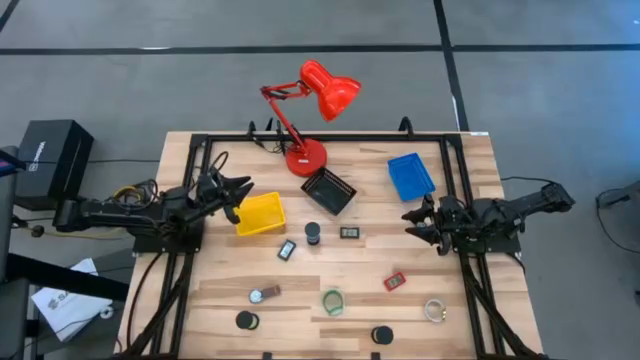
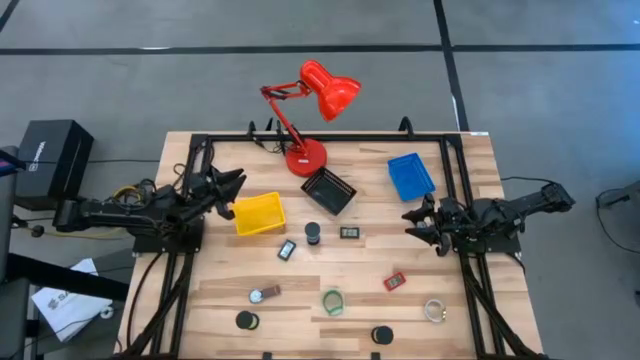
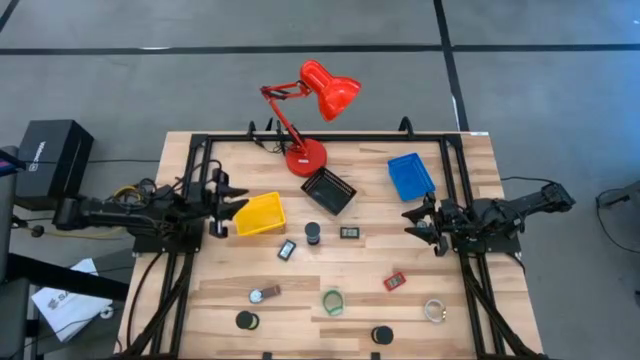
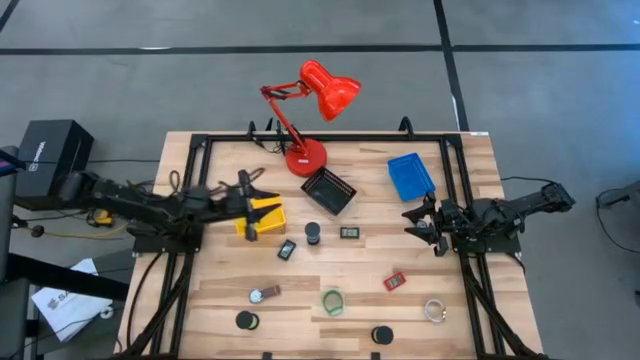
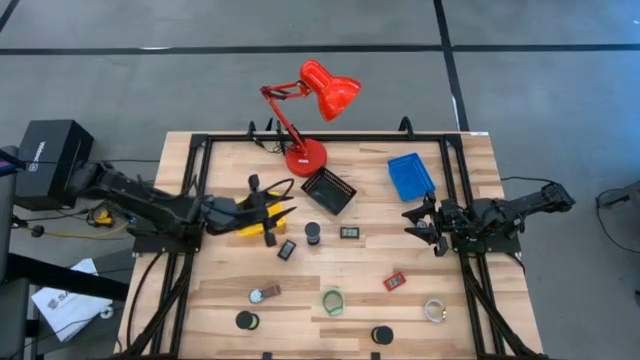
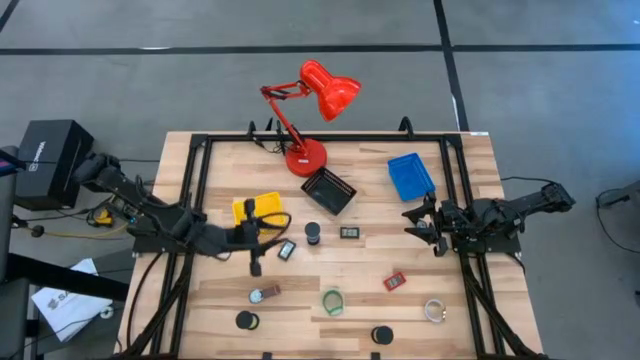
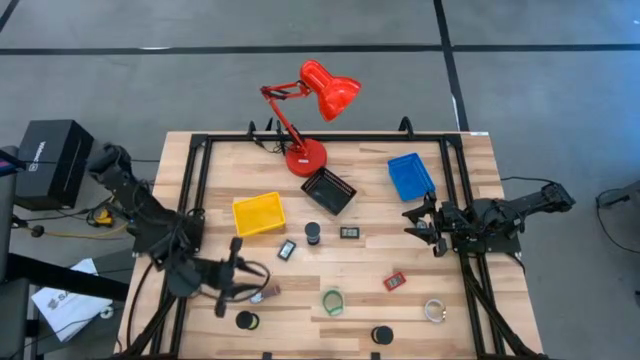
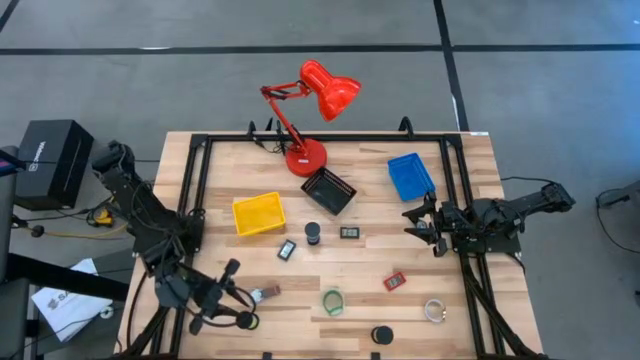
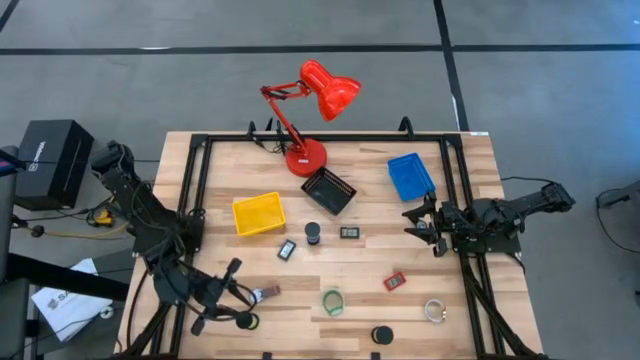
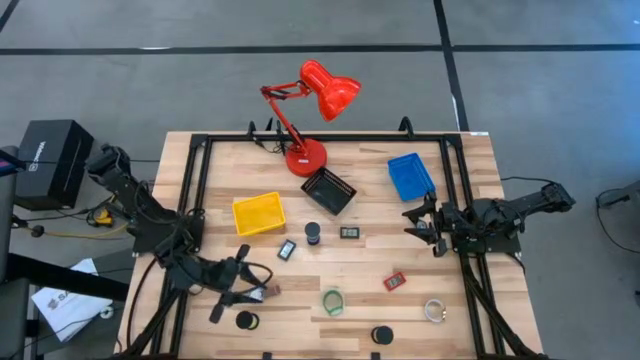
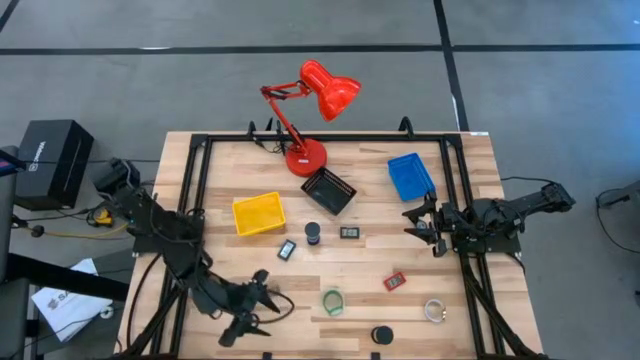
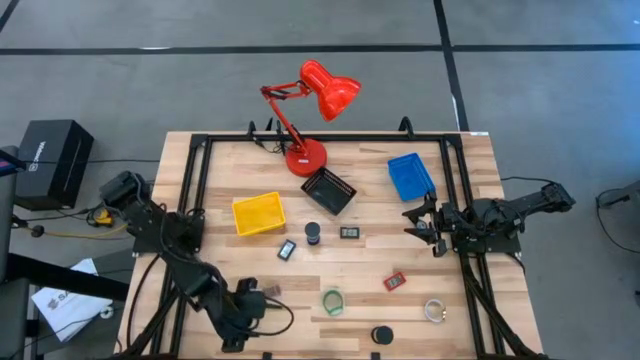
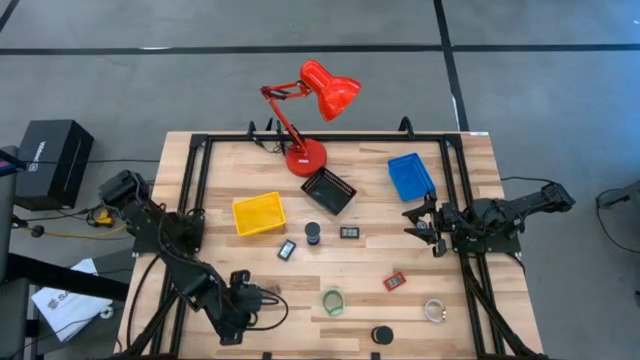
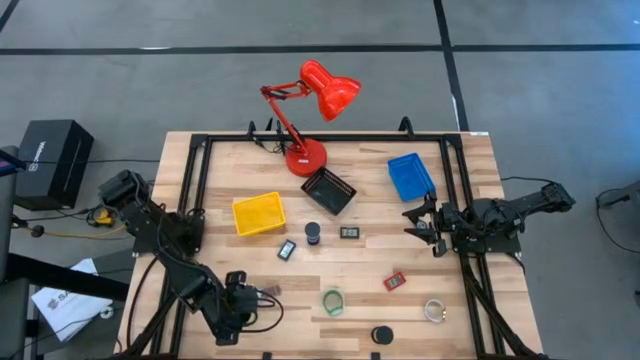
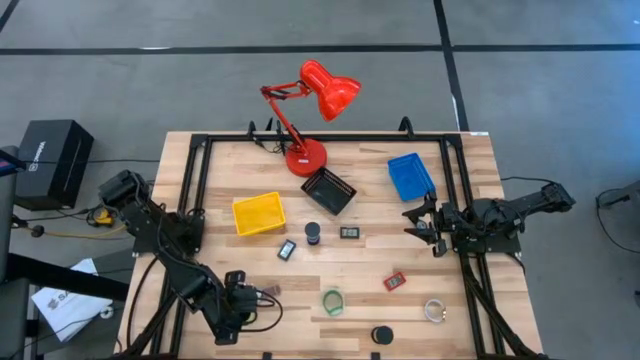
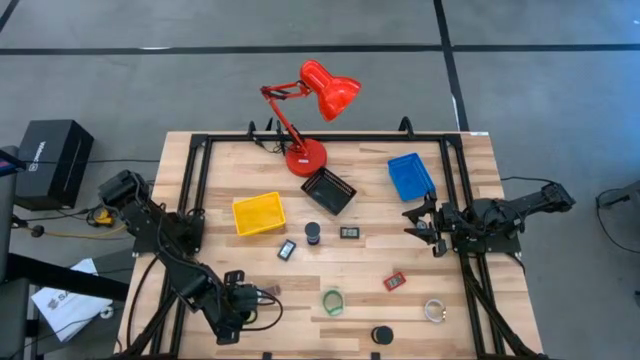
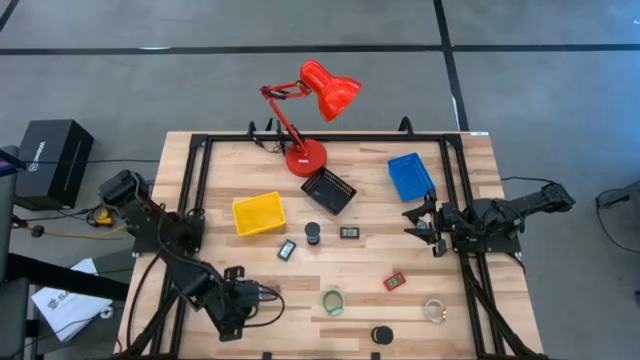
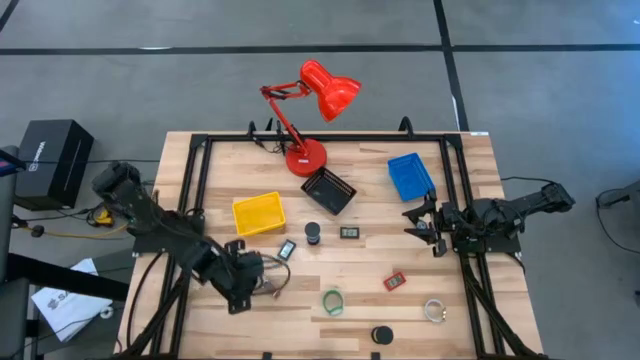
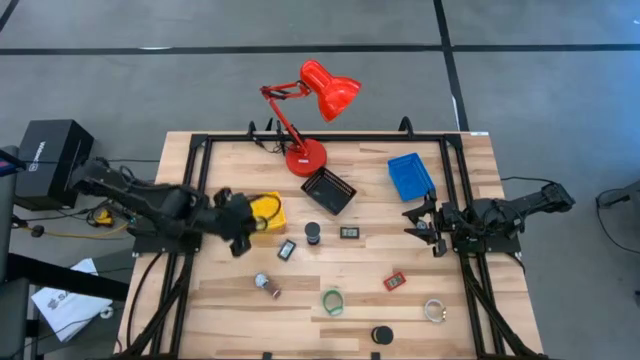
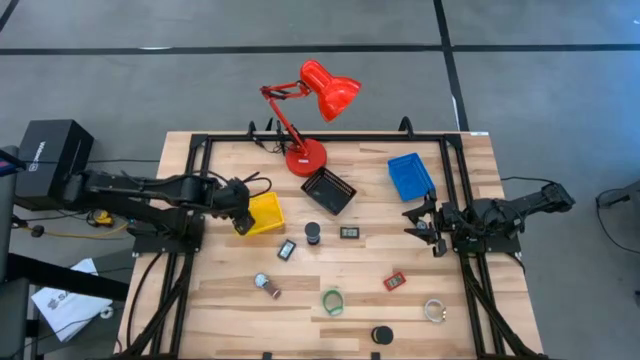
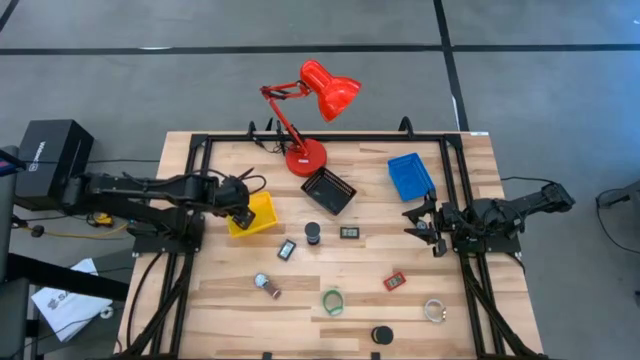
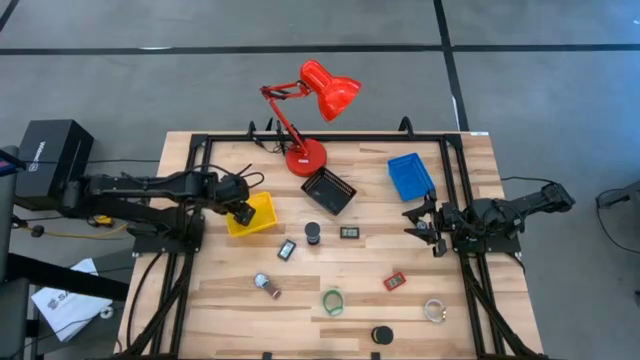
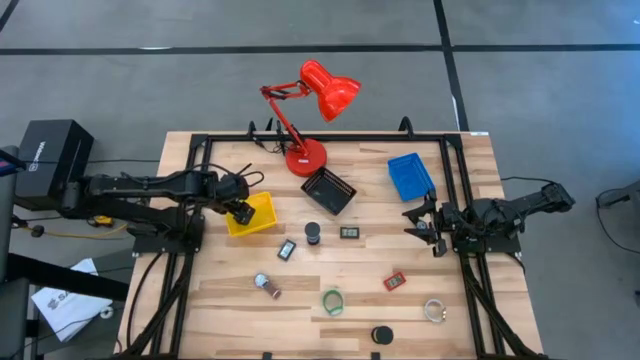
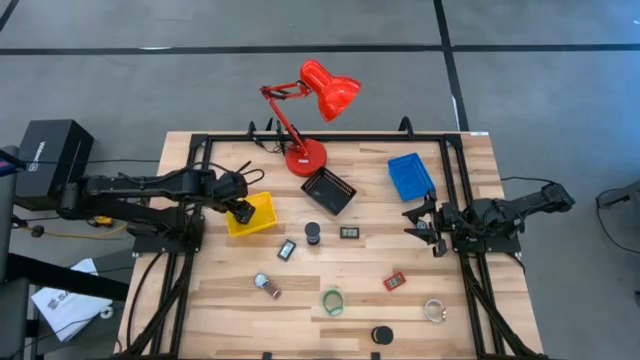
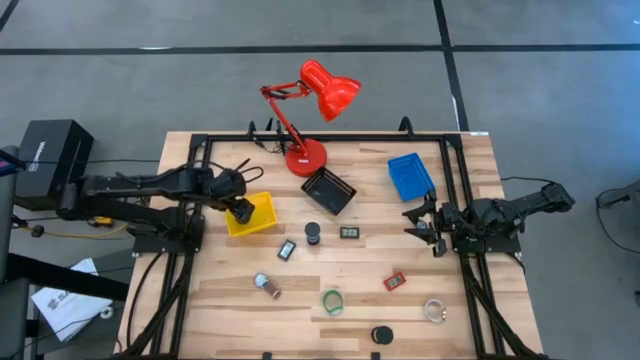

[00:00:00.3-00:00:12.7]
Task: Pick & Place Office items
Put the left green hourglass into the yellow bin

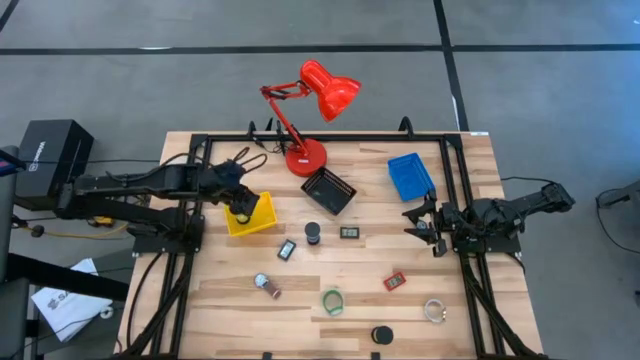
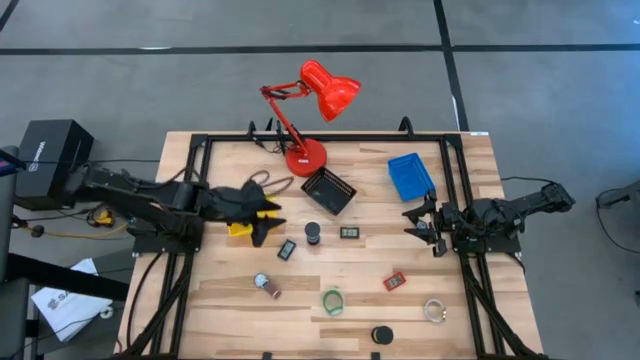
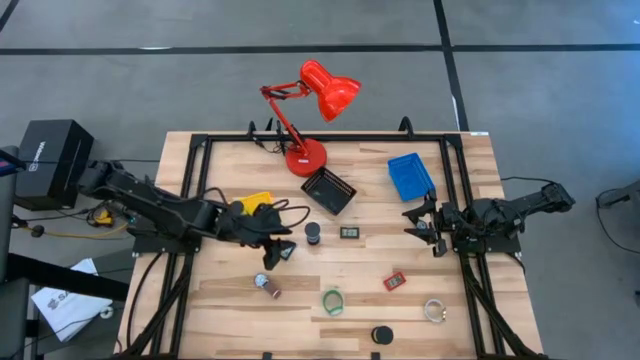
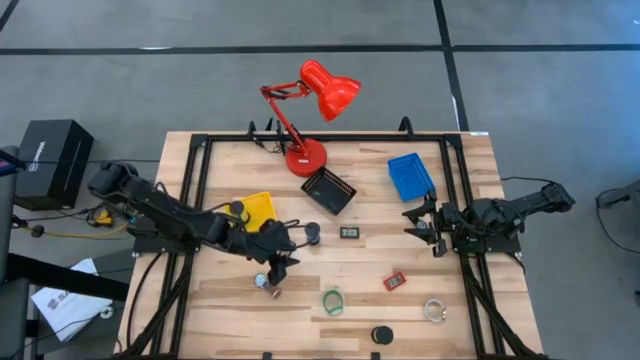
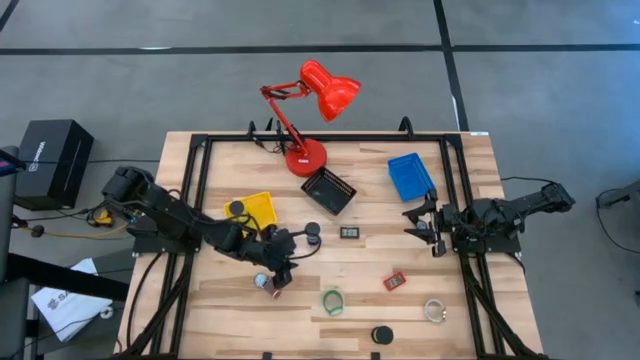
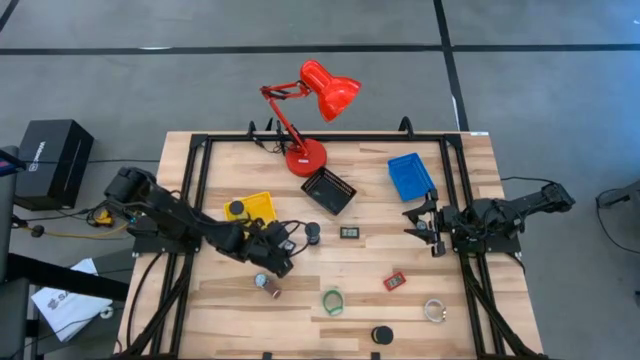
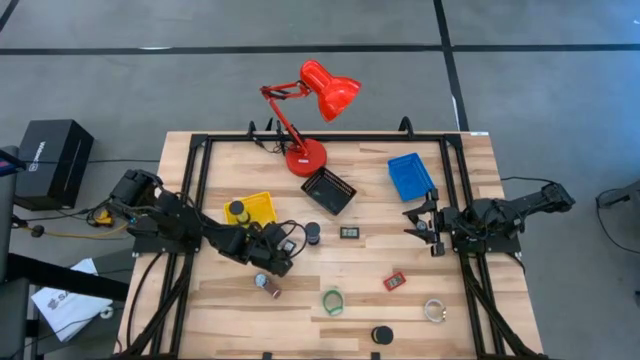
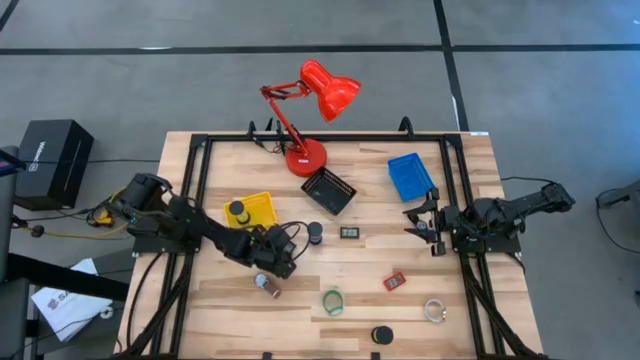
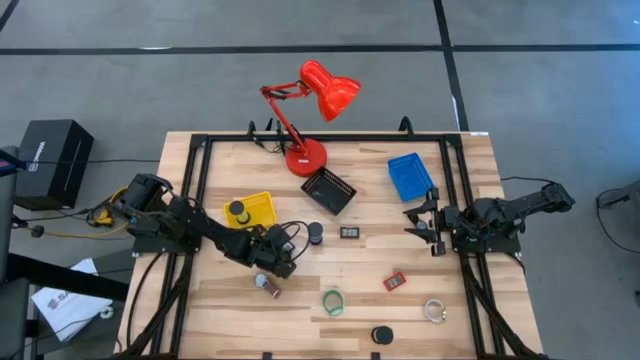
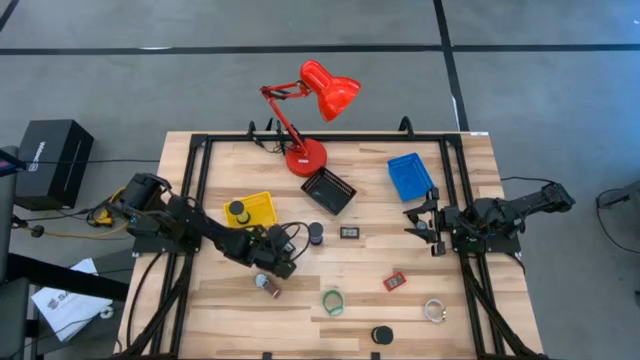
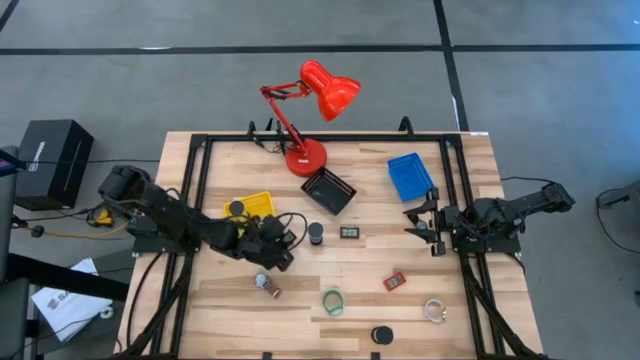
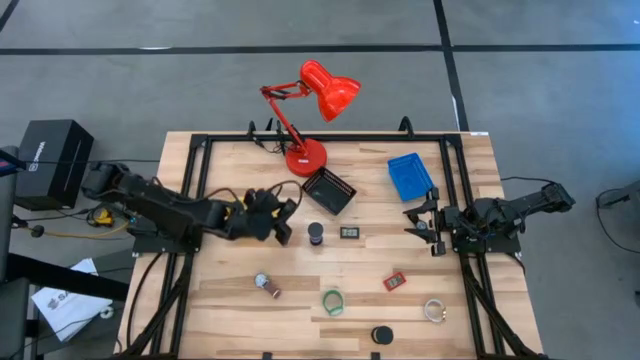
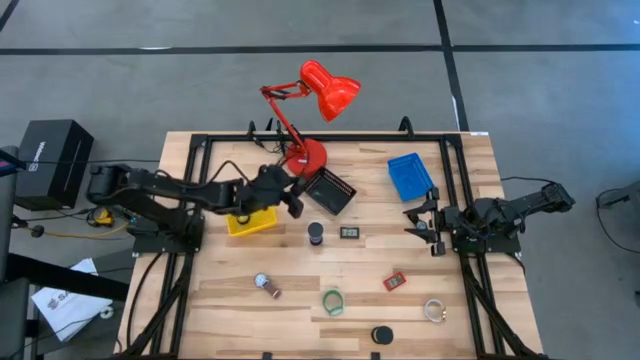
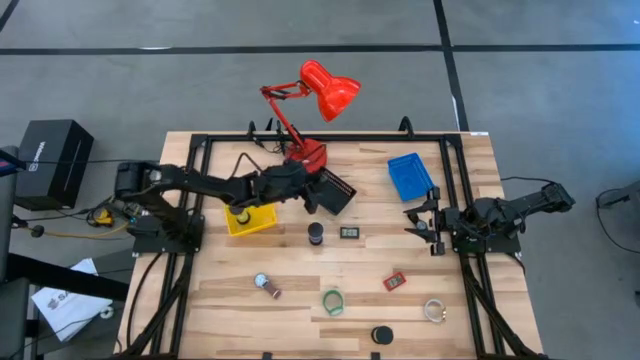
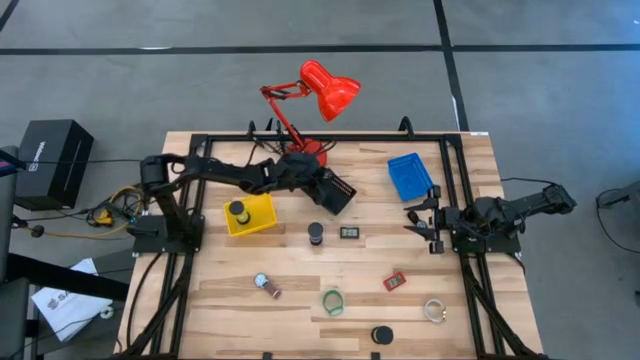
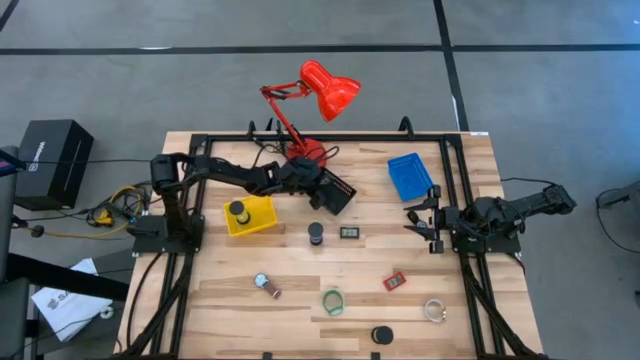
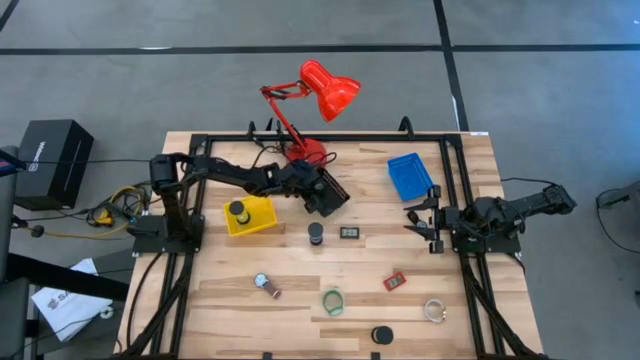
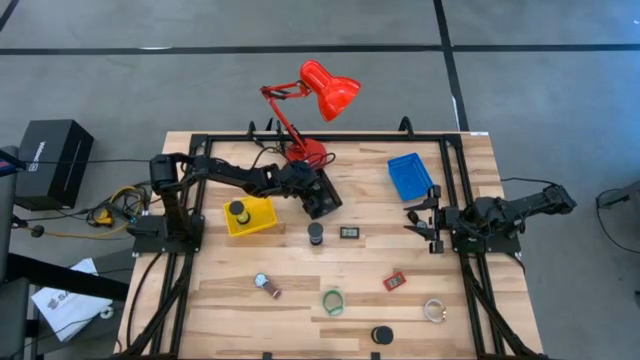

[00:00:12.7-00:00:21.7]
Put the left black digital clock into the black bin
